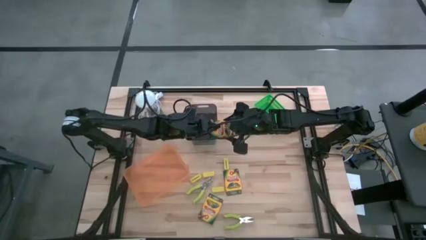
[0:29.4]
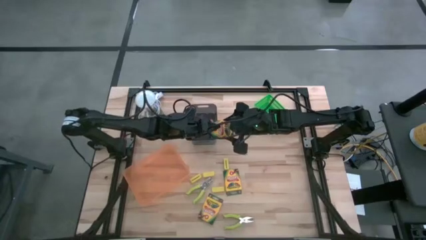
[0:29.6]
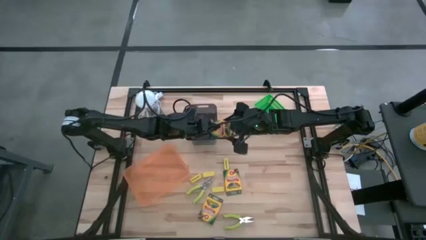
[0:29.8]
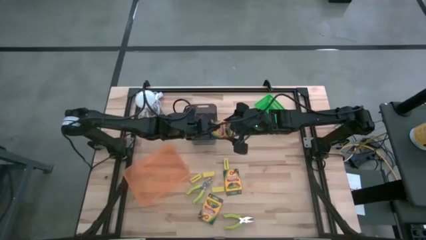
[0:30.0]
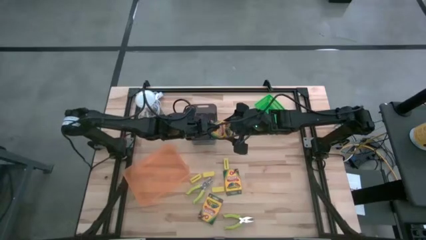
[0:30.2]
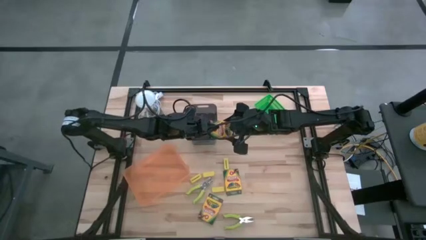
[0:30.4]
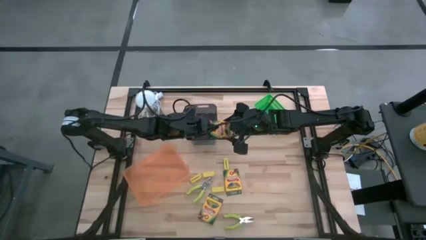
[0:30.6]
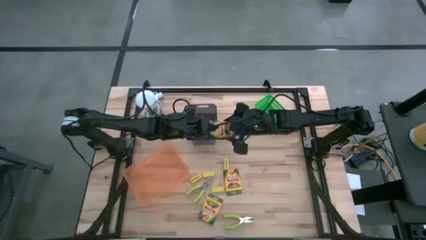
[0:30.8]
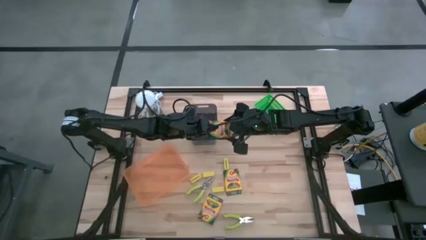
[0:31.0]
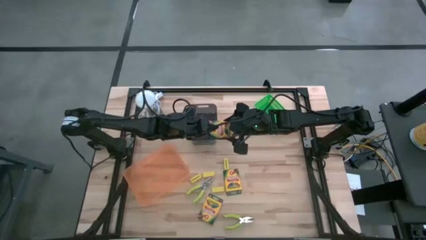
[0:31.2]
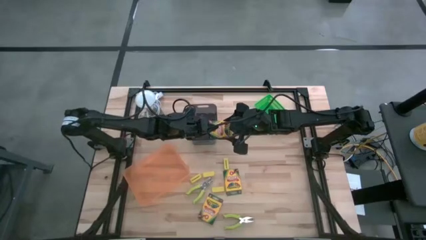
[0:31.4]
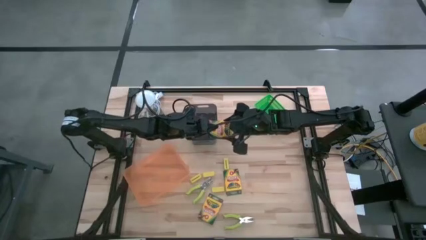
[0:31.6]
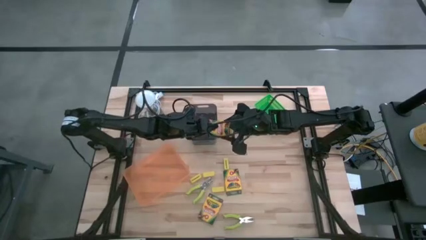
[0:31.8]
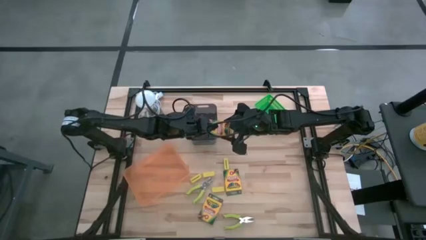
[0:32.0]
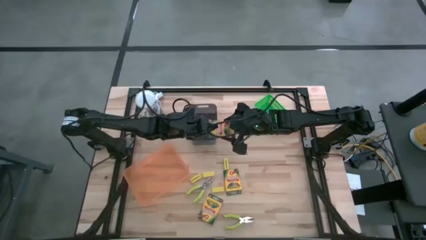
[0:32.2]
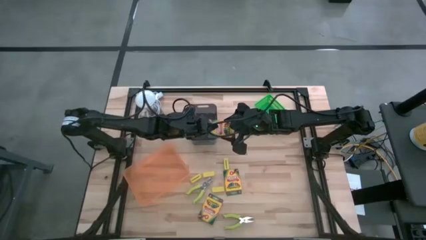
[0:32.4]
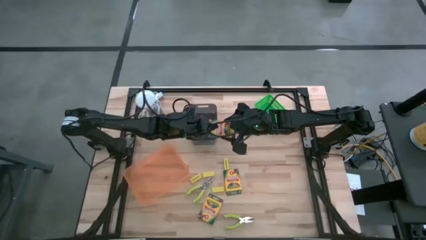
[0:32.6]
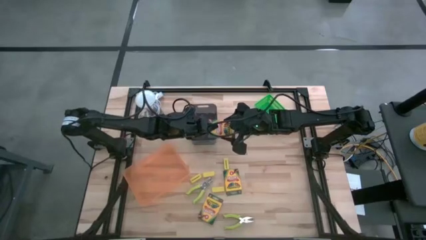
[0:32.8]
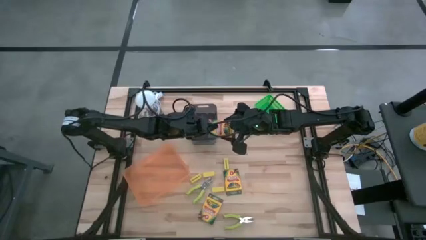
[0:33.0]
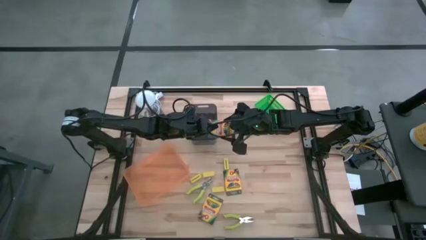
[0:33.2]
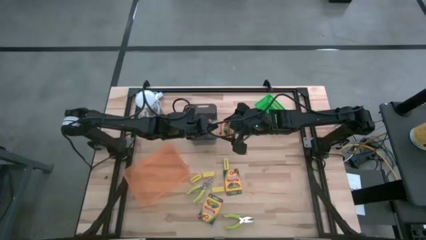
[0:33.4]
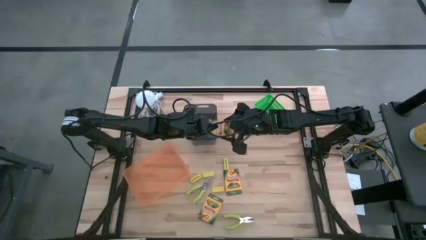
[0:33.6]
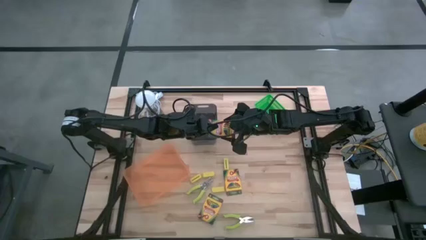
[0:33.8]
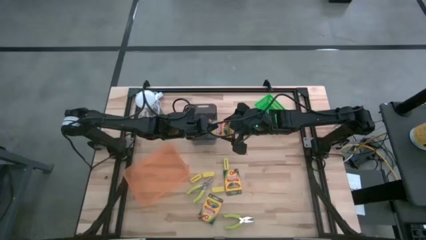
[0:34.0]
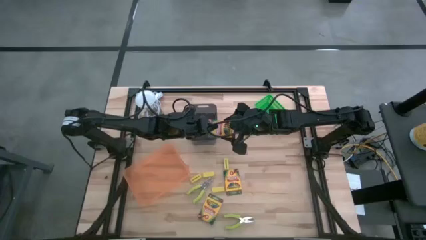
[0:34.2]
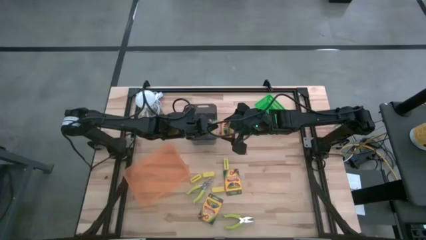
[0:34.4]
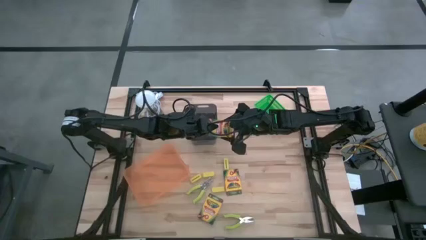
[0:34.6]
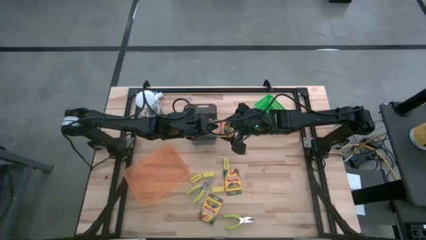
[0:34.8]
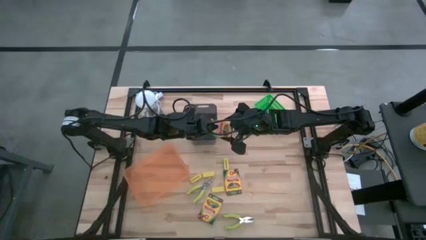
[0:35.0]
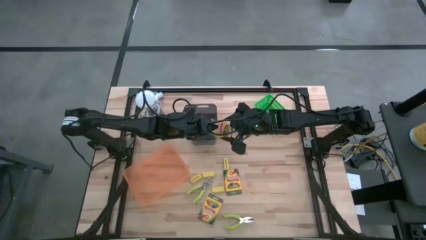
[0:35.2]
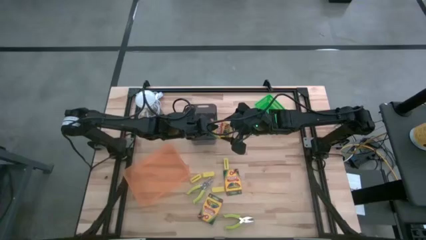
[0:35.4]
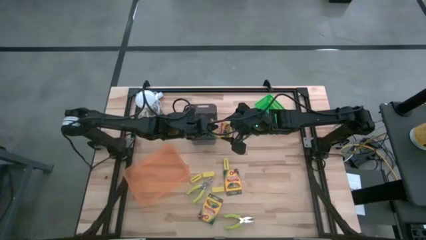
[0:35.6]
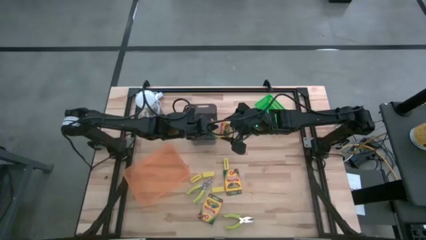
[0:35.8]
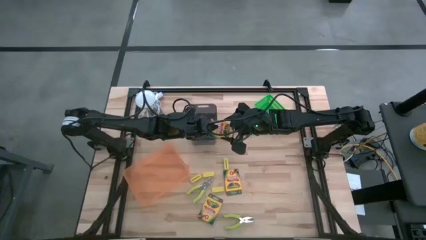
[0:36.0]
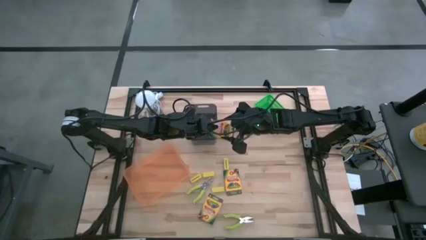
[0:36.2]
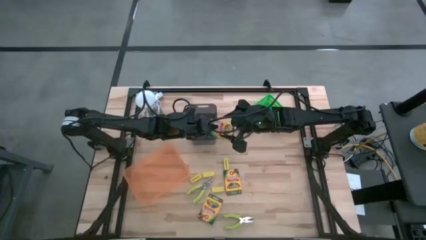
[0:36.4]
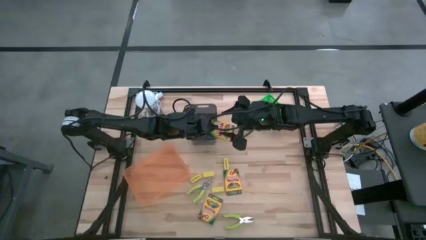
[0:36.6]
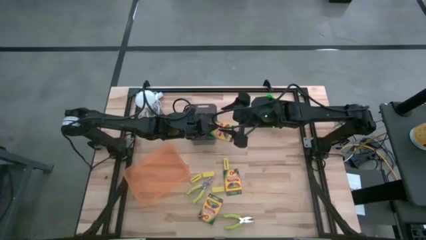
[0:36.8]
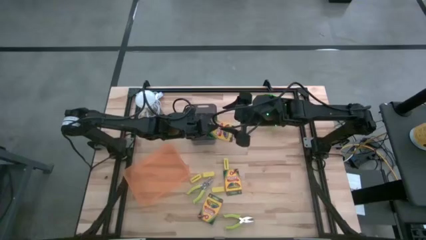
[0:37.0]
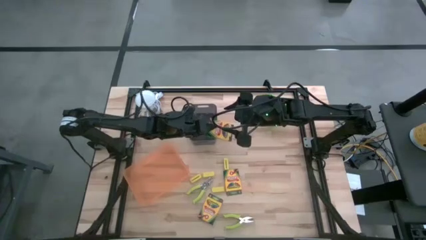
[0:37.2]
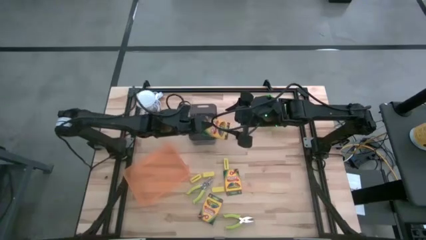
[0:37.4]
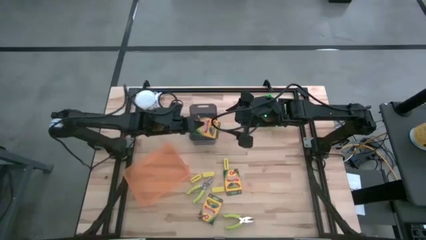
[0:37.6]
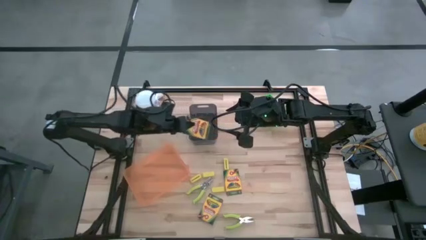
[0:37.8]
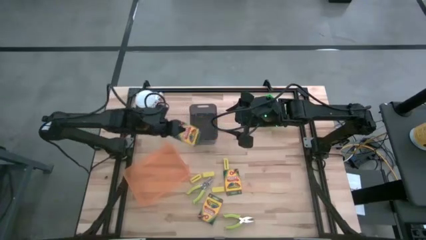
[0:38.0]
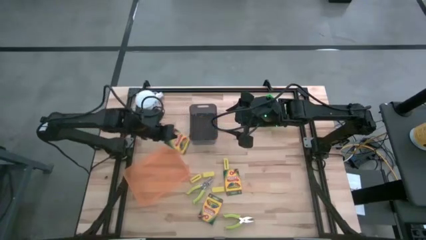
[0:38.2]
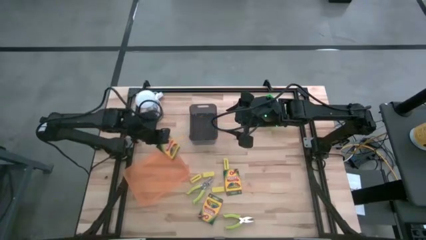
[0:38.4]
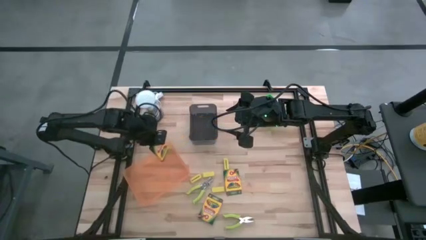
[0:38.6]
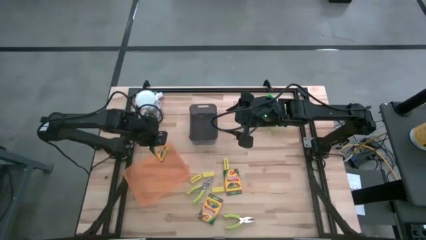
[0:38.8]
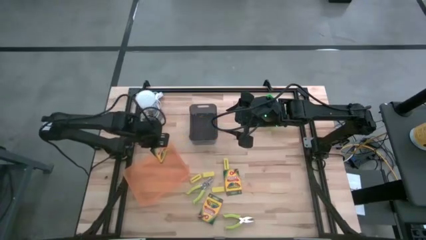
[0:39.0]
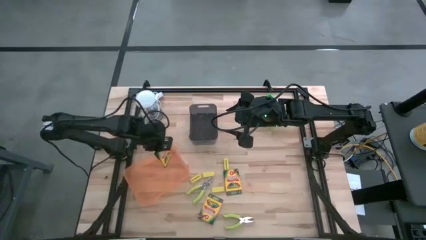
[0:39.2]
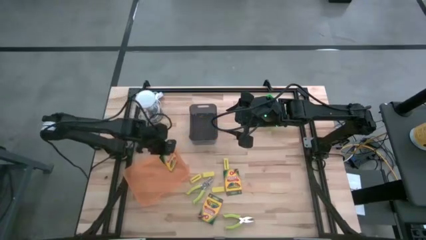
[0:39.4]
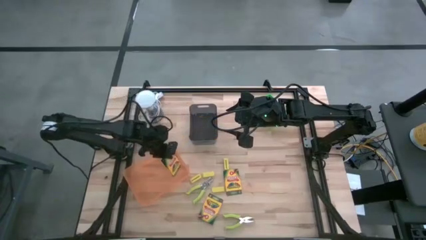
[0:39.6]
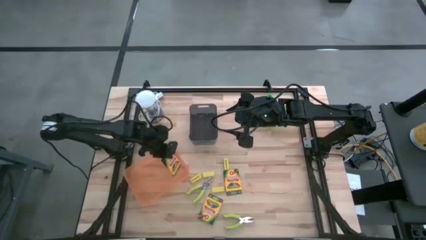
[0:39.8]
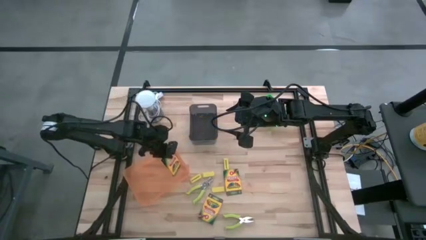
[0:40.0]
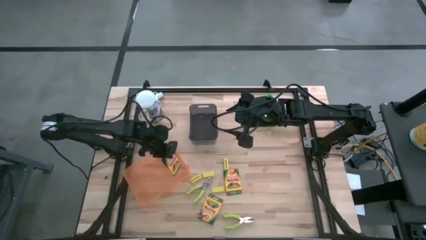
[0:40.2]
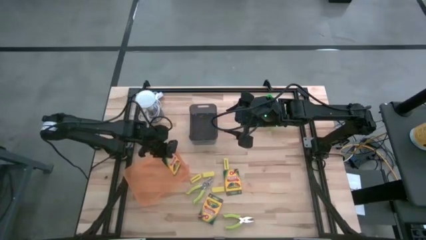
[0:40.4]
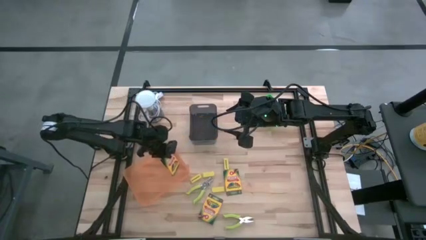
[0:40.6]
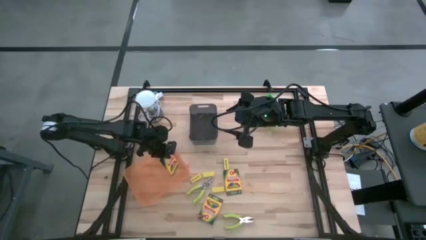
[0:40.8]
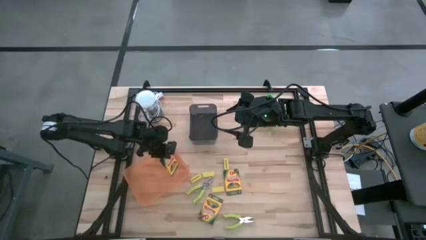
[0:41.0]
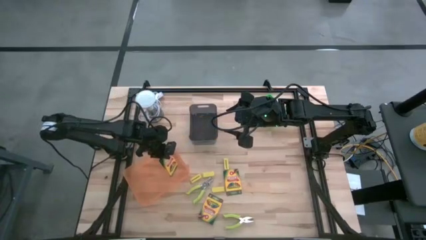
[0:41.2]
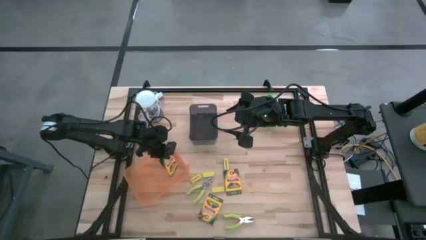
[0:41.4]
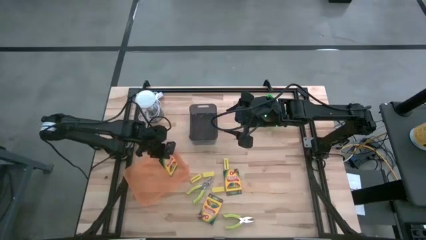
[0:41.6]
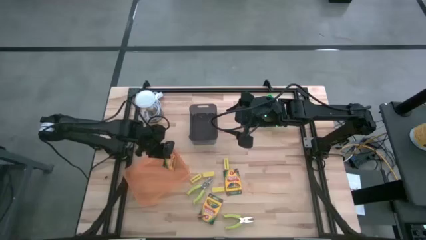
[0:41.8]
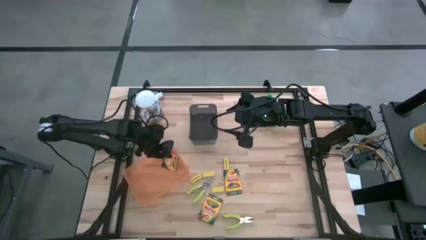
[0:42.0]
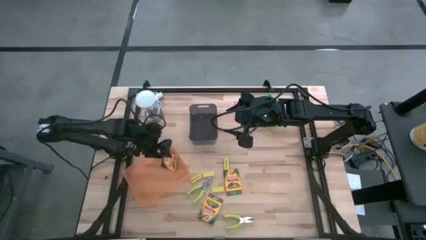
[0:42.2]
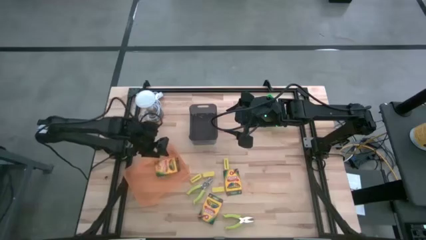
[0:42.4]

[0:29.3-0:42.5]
Task: Pick & Place School Supplies
Put the pack of crayons into the orange bin
